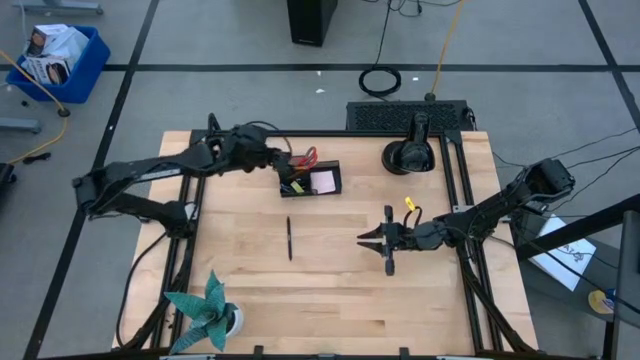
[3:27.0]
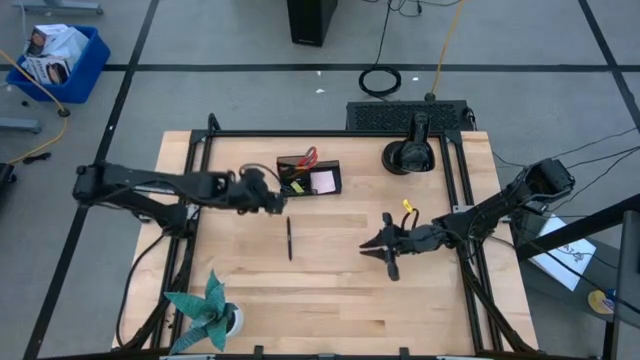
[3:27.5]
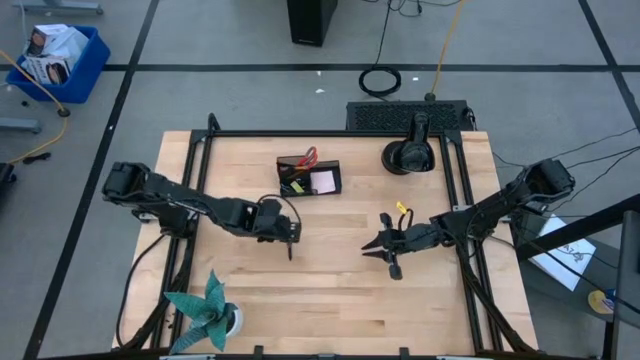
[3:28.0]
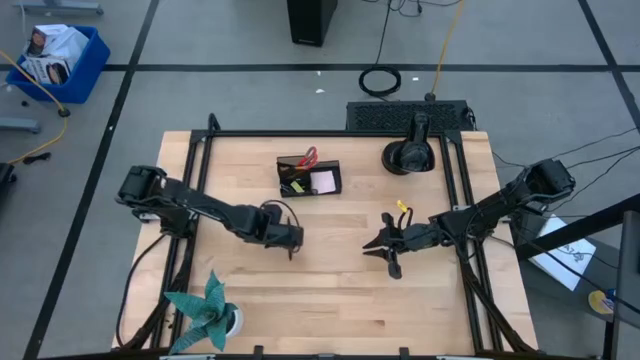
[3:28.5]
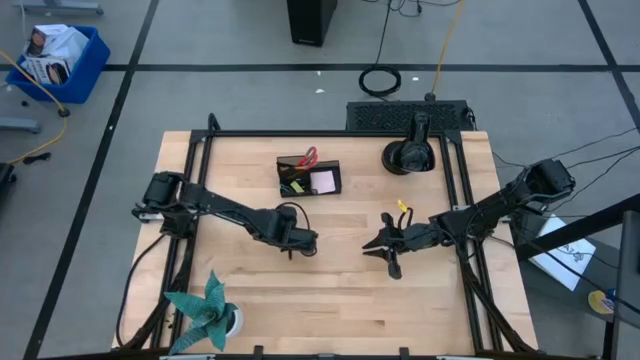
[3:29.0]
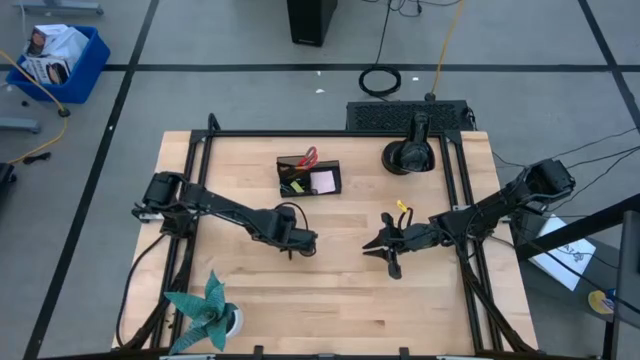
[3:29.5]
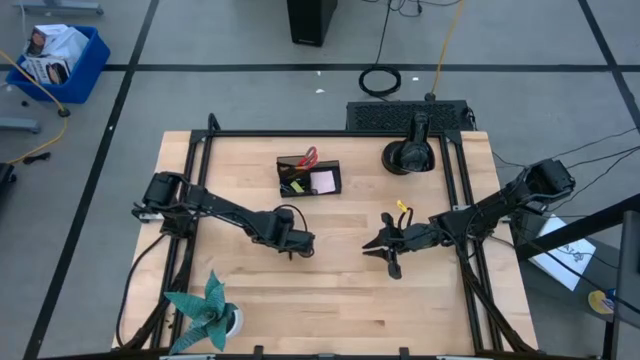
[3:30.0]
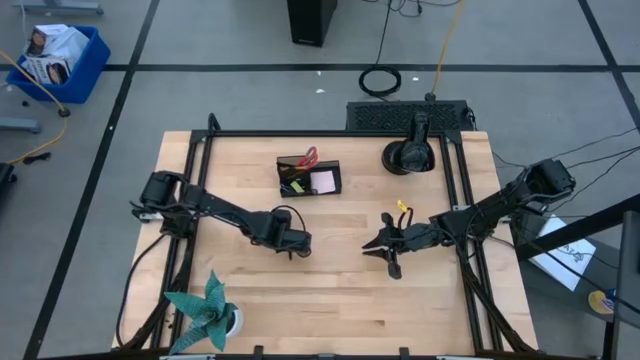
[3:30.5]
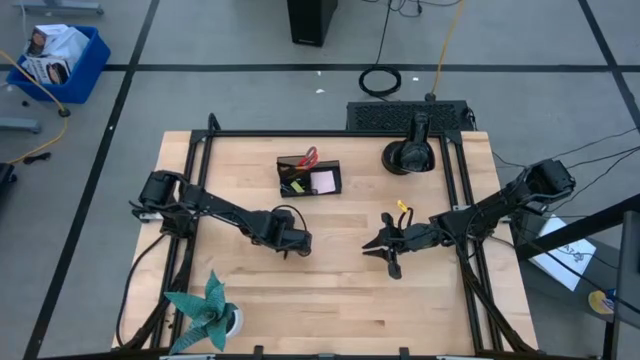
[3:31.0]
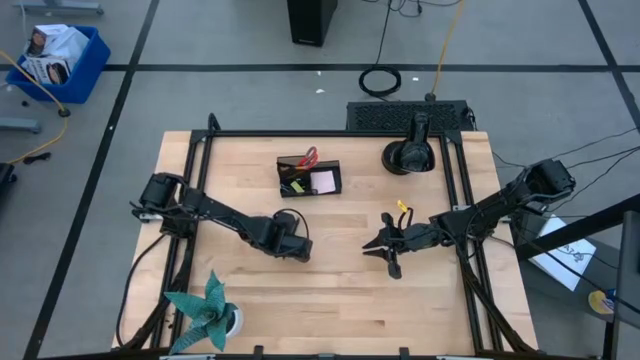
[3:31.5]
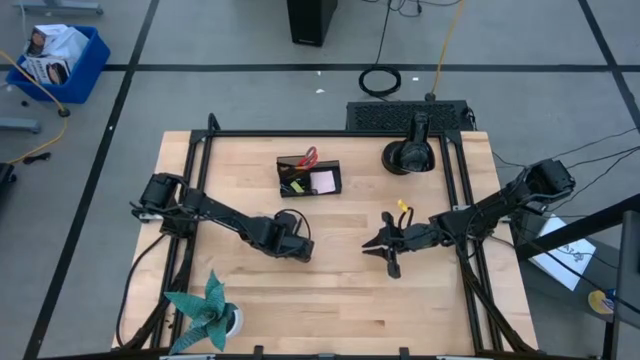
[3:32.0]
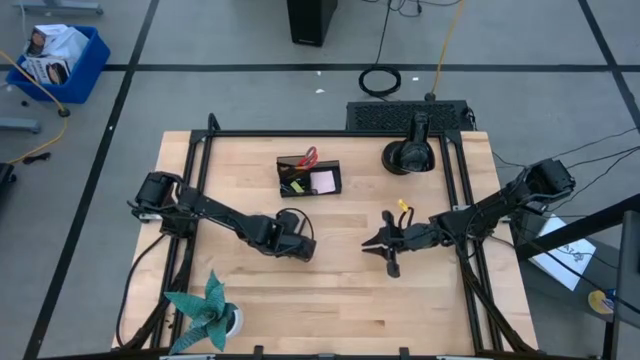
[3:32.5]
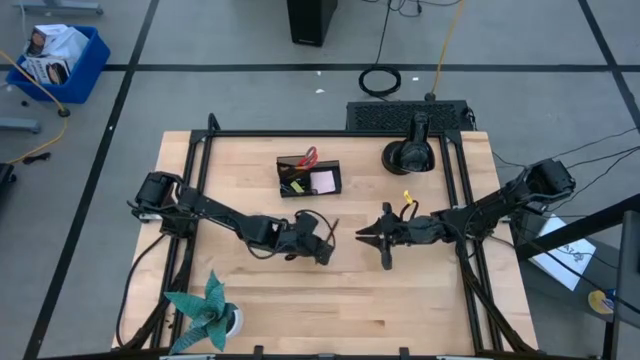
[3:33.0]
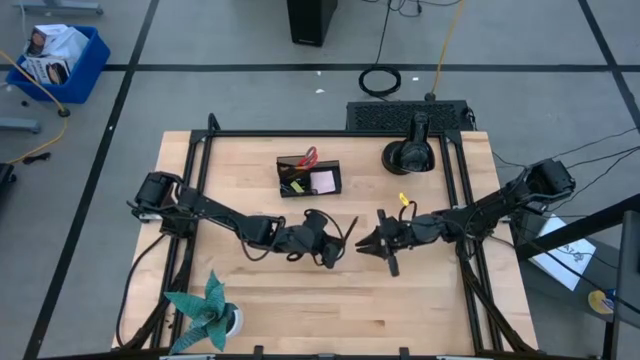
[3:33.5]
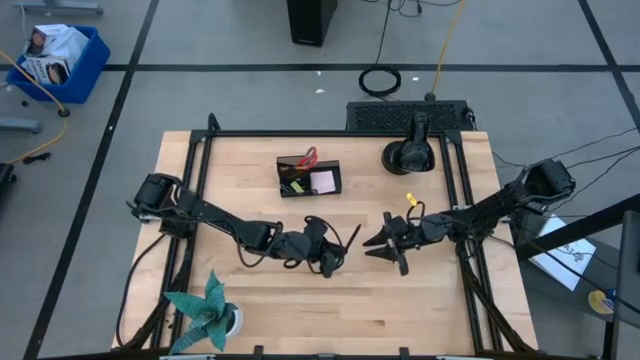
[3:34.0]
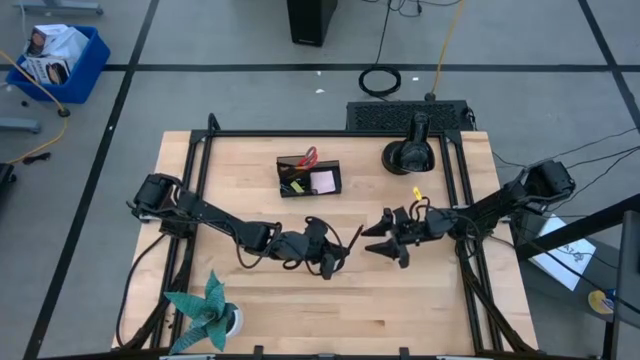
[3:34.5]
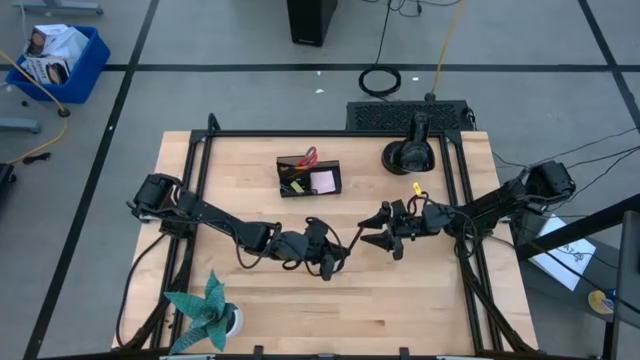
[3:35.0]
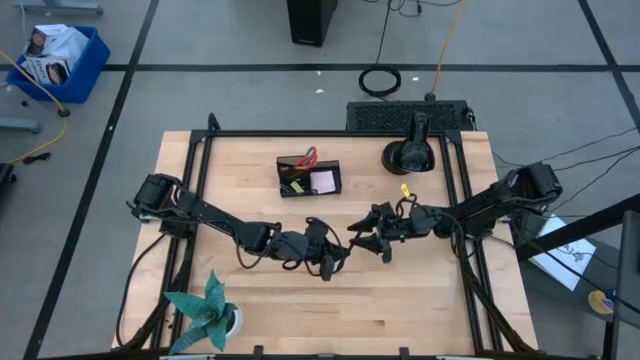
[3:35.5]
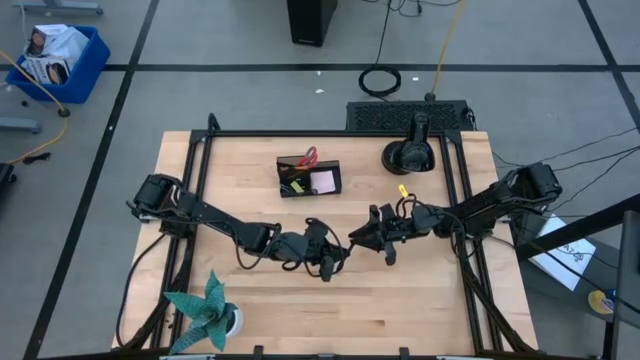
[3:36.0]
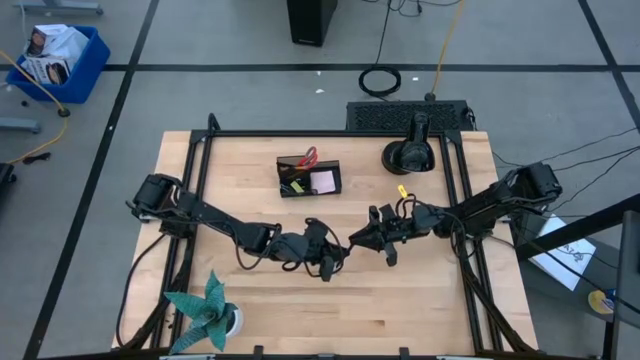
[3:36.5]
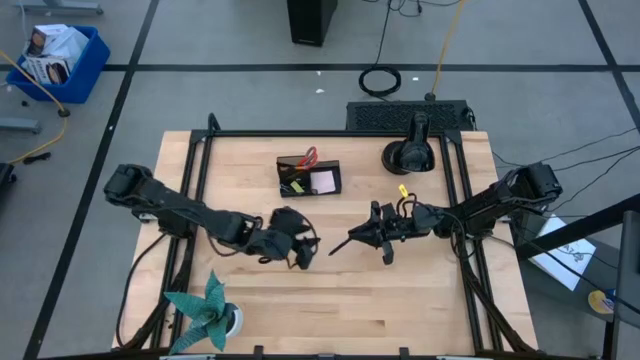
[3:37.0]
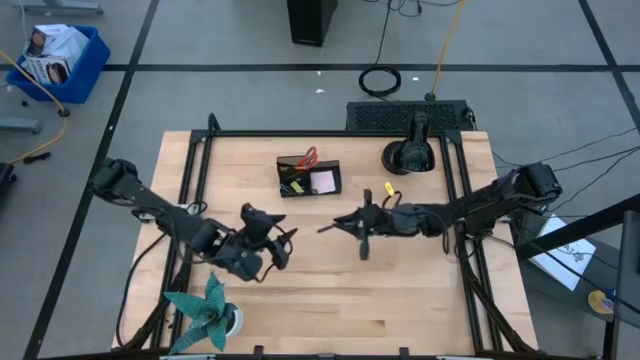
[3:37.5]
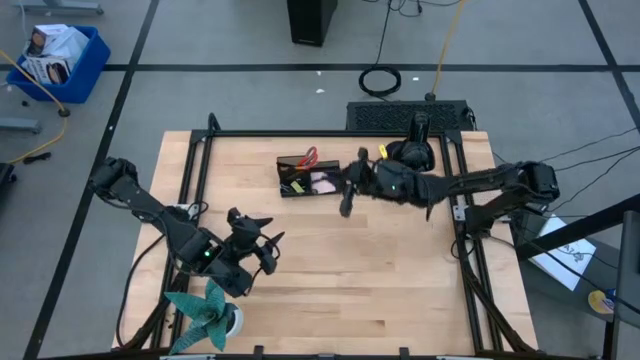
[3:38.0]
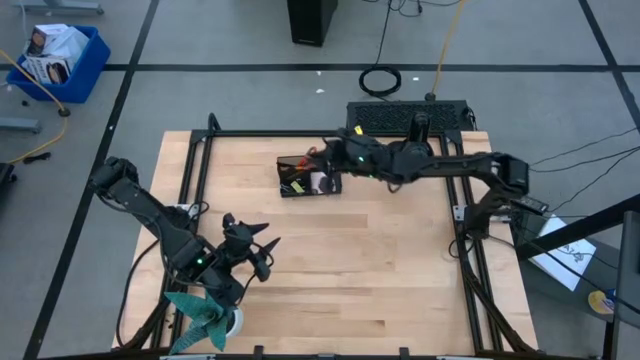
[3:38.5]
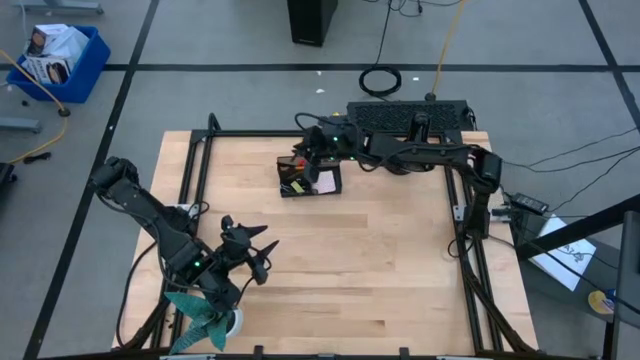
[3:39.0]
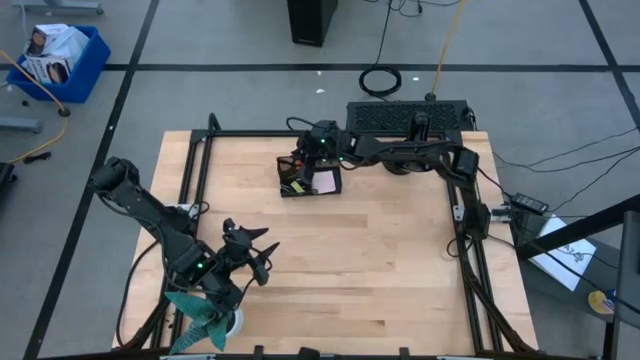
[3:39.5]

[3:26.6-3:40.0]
Task: Pick and place office supplies into organizer
Put the black pen into the black desk organizer

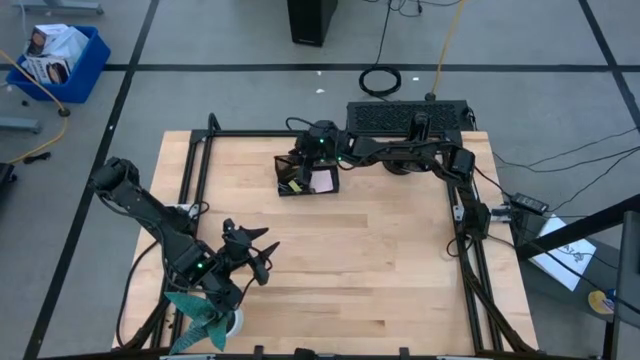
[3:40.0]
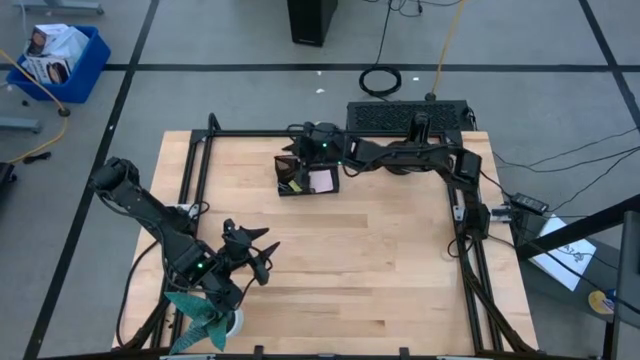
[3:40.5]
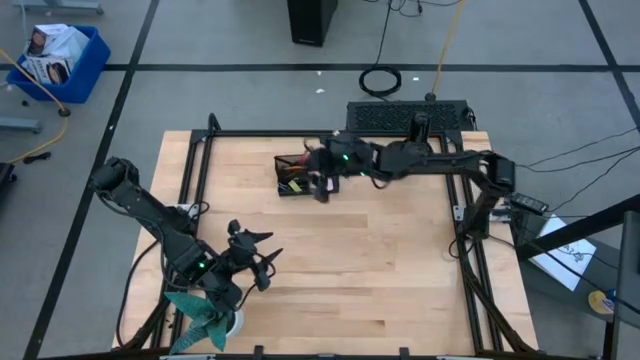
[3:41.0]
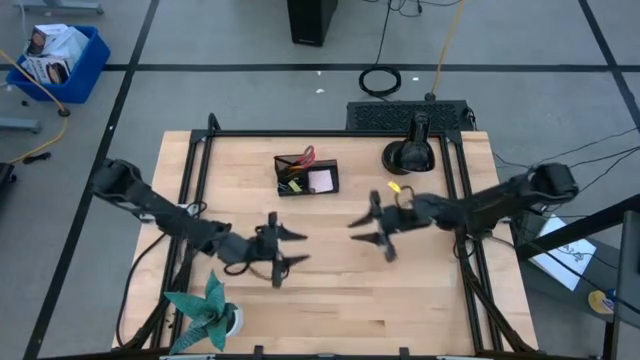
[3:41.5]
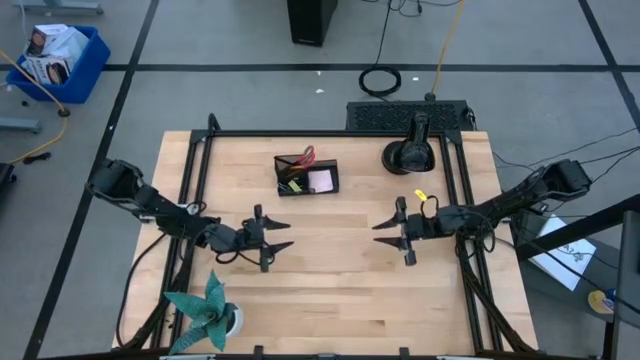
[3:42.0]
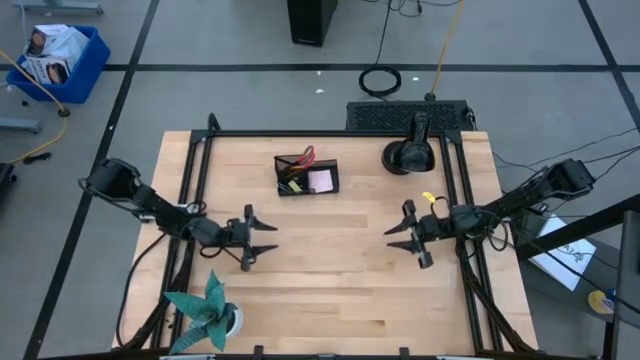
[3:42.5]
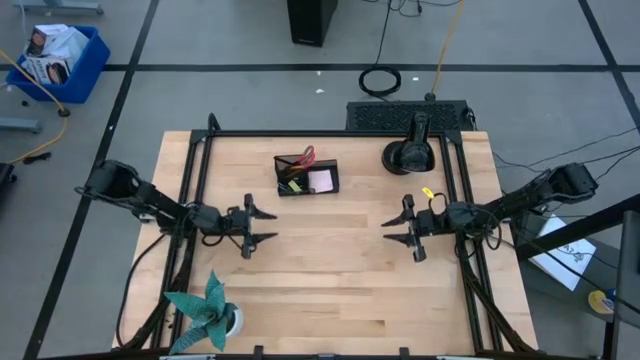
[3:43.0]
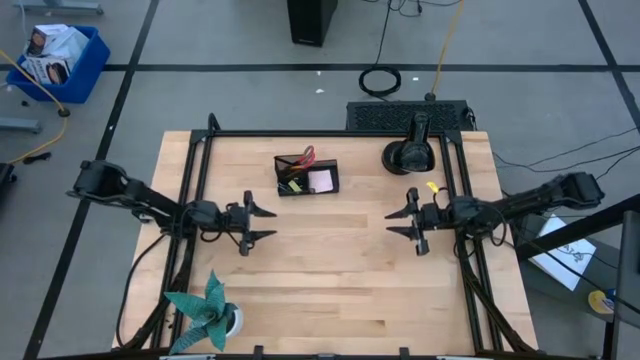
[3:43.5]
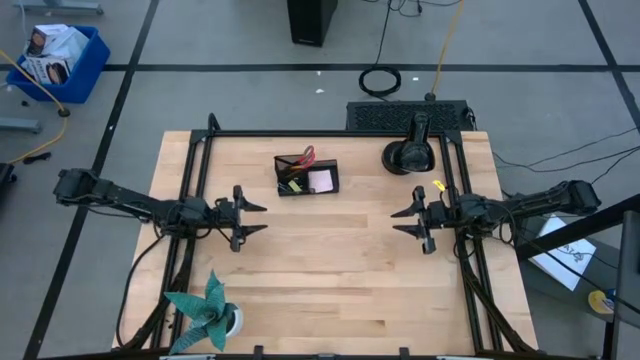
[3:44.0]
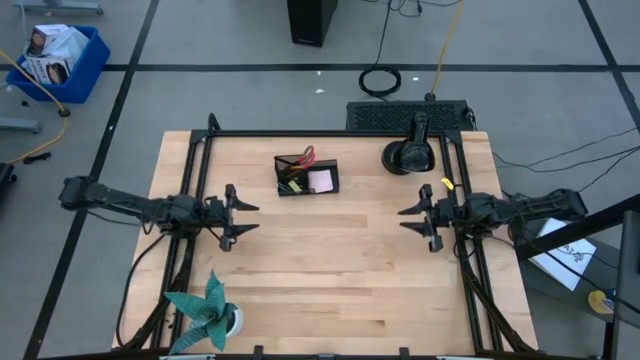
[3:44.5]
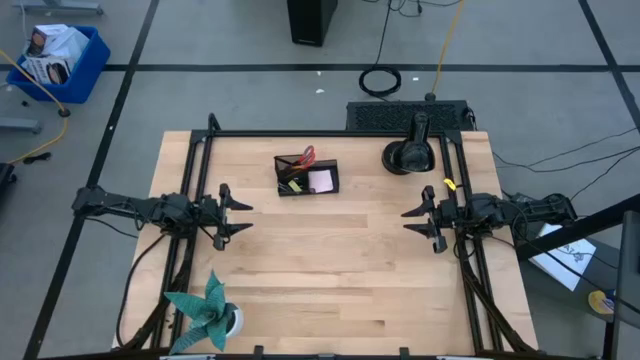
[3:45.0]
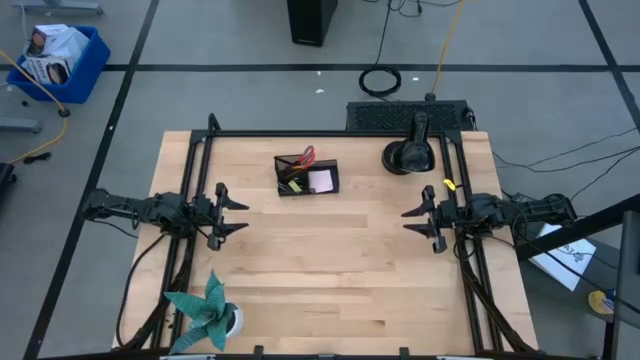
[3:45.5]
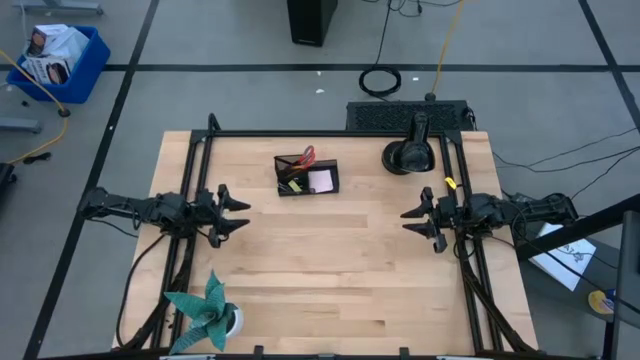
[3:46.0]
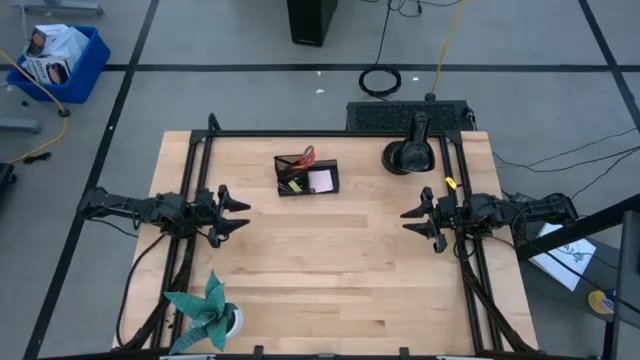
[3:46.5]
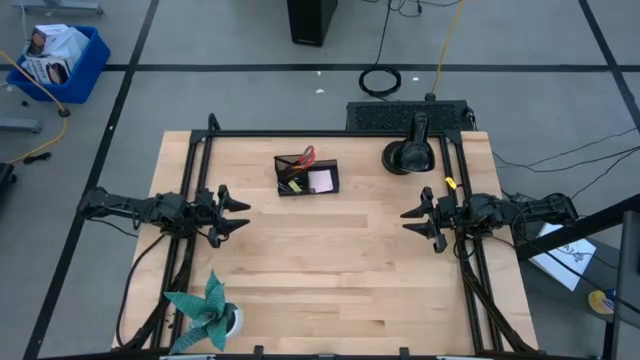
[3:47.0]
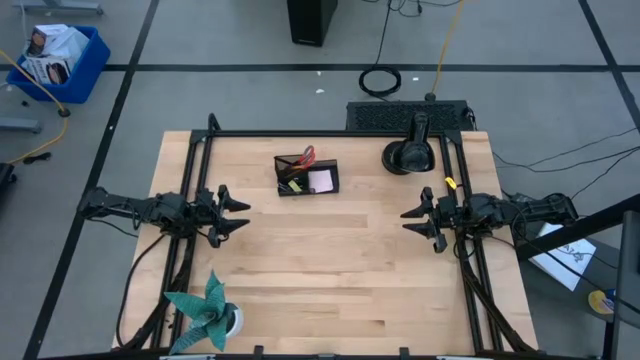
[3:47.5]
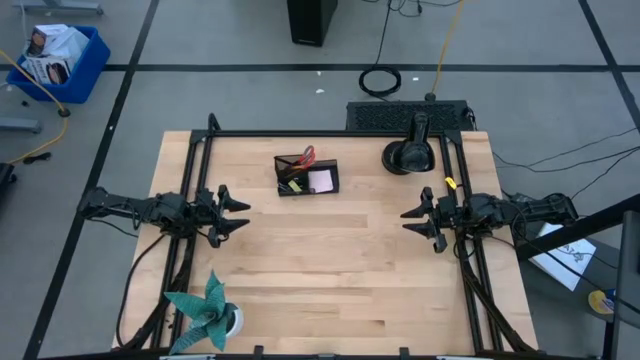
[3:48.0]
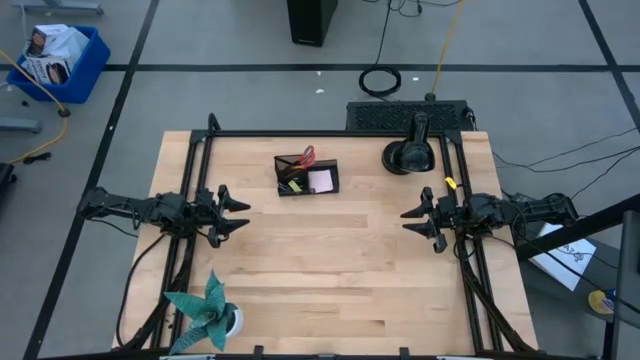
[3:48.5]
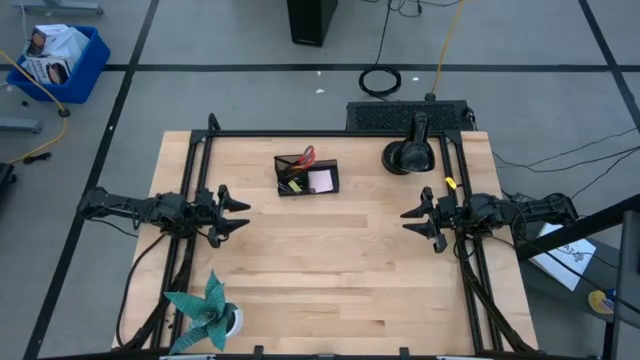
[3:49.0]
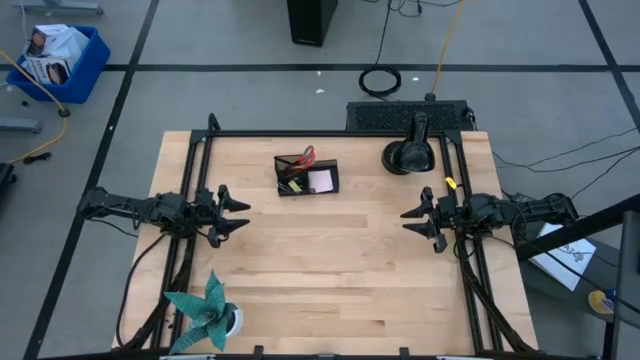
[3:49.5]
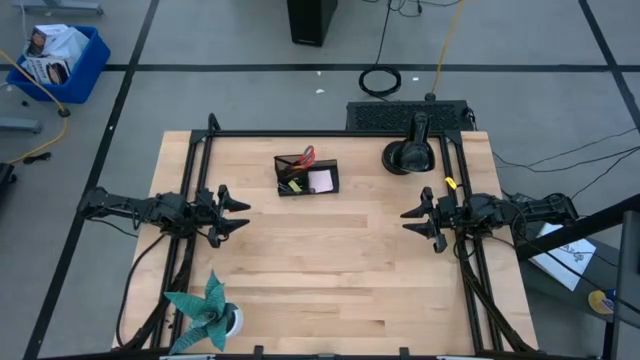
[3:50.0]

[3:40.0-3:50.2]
Return to Home Position
